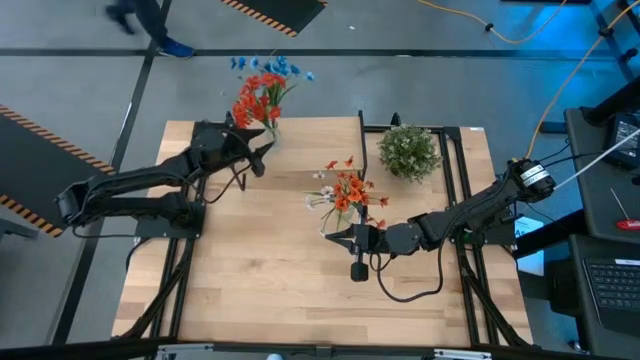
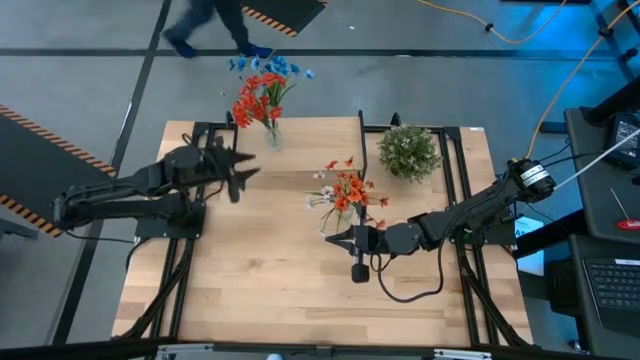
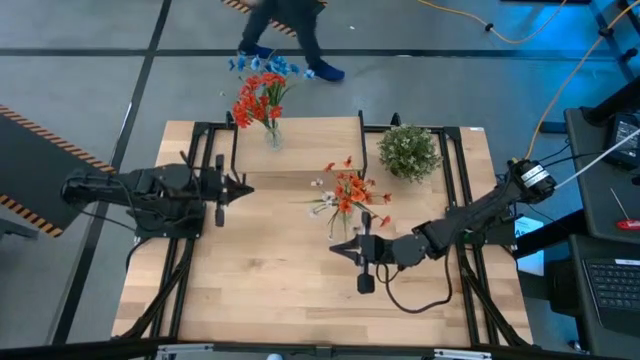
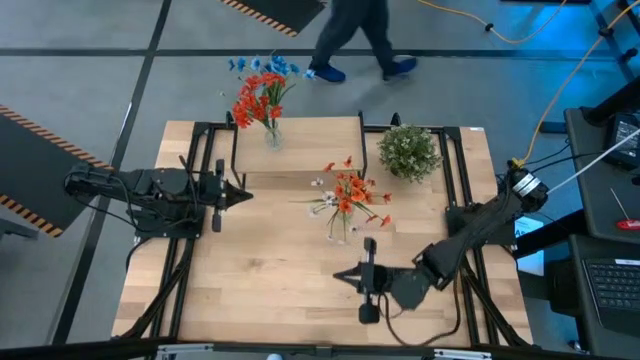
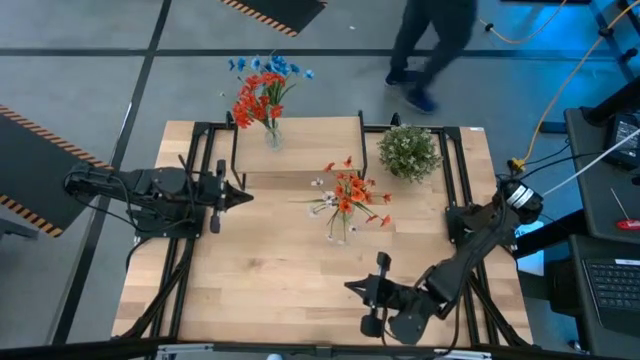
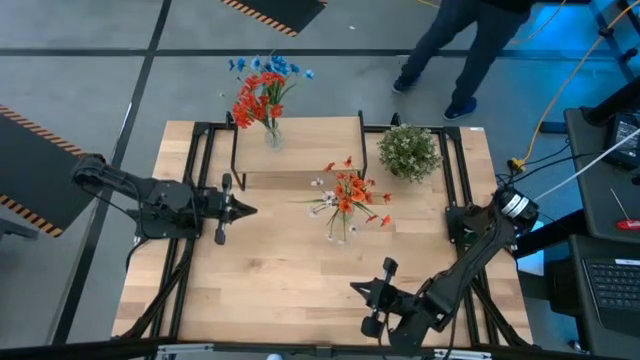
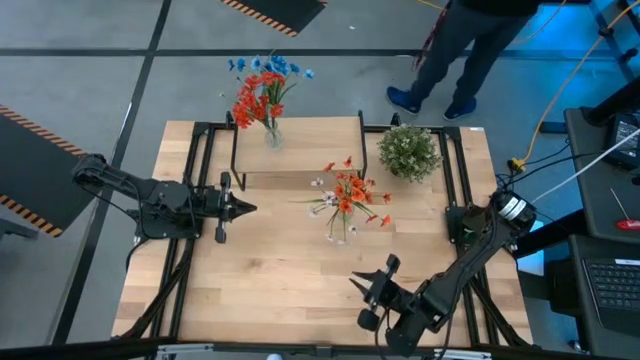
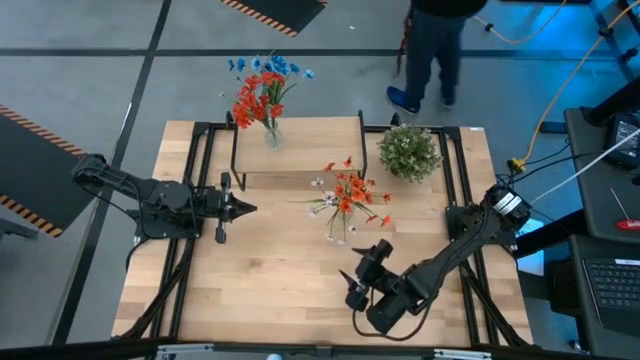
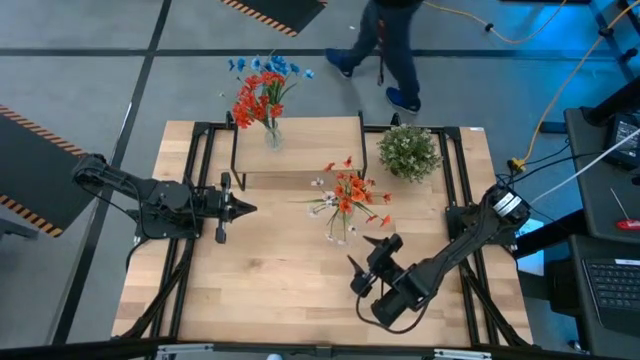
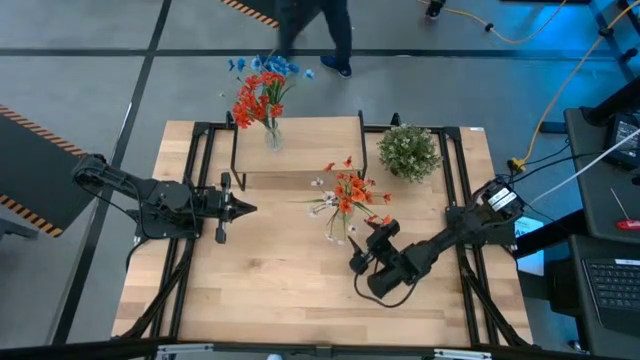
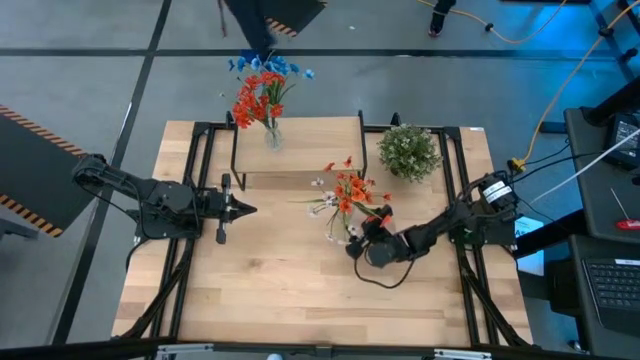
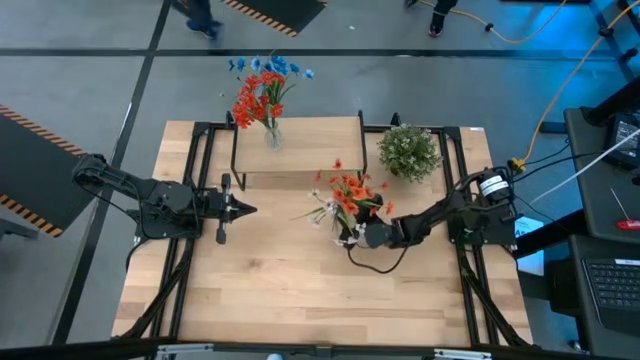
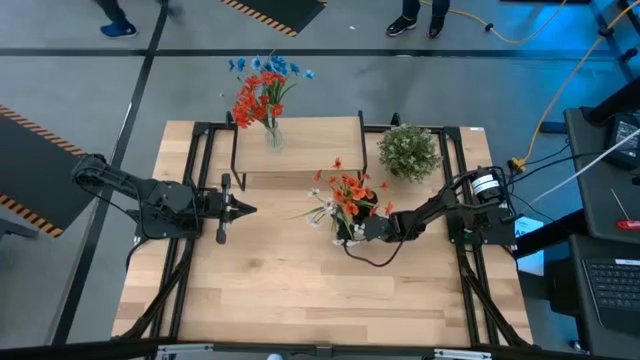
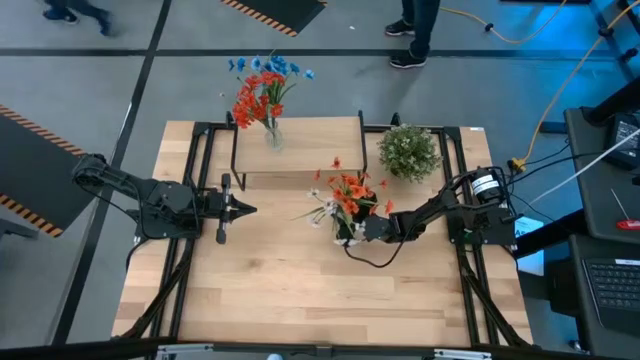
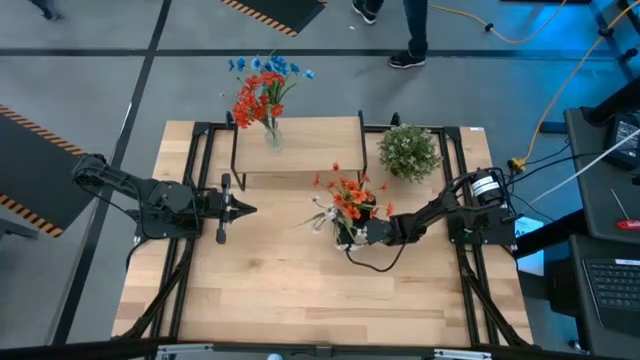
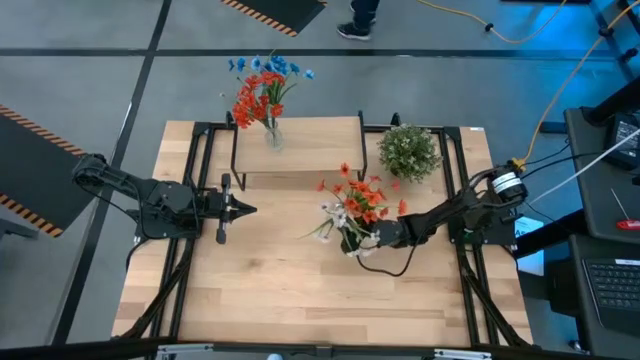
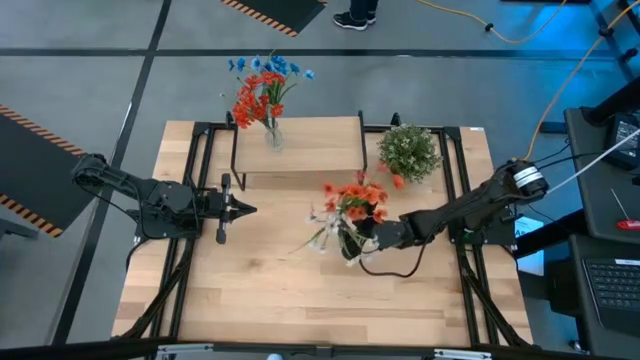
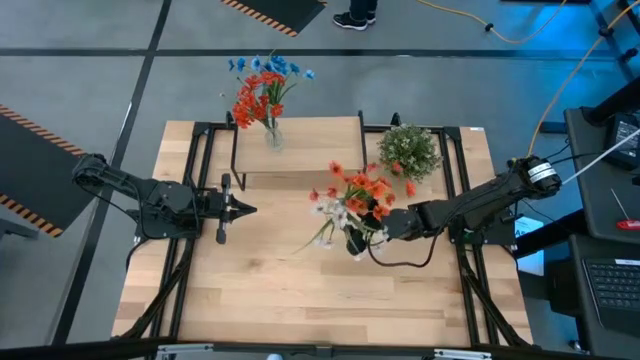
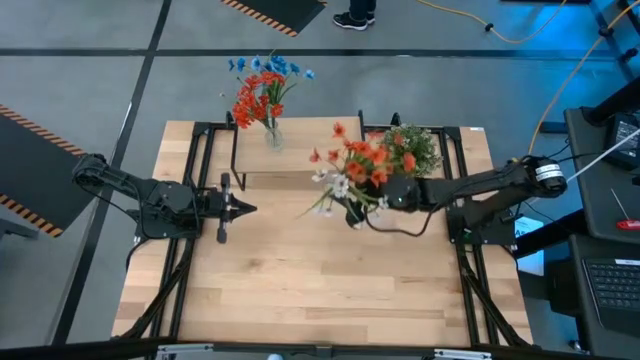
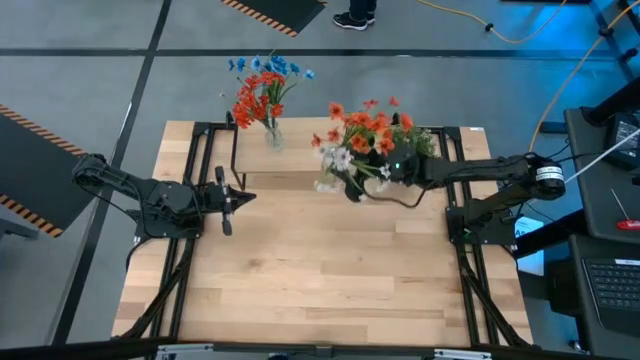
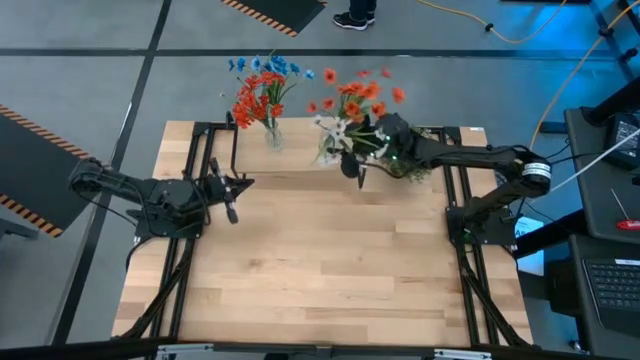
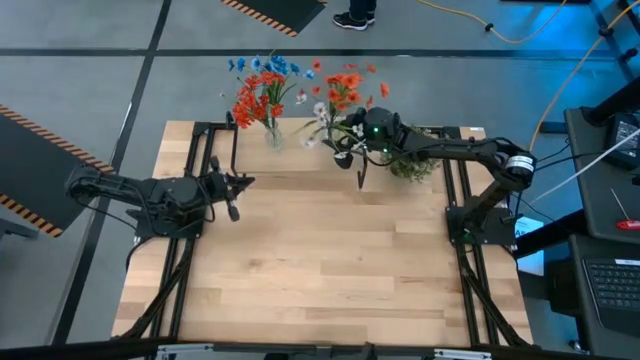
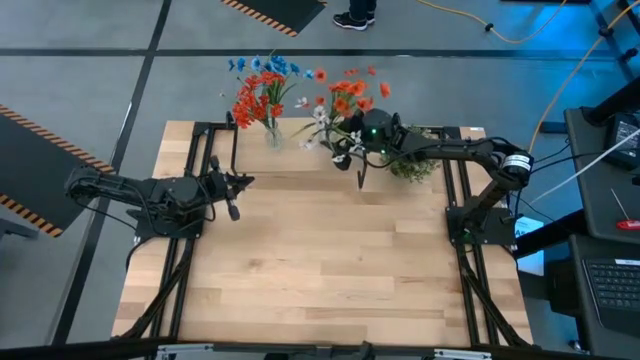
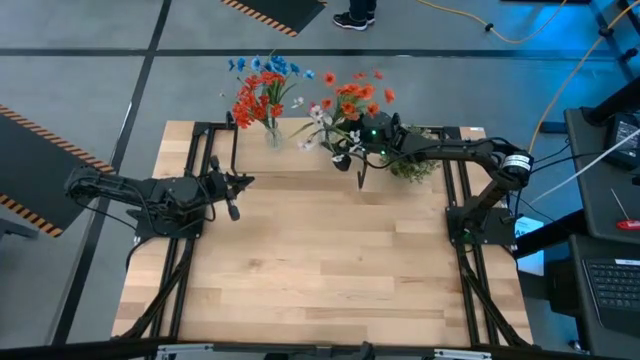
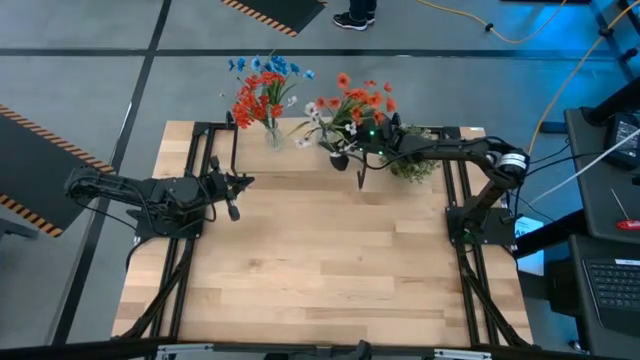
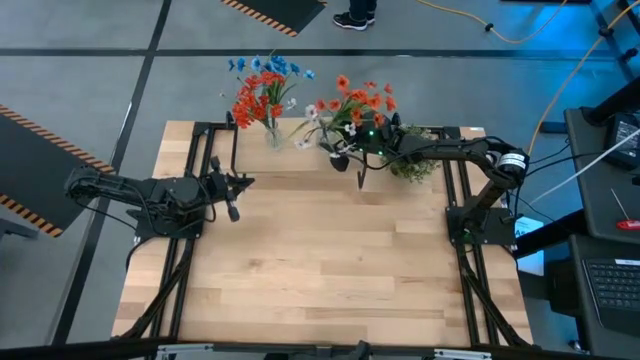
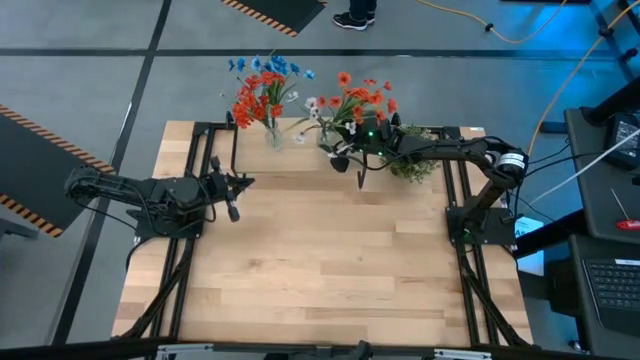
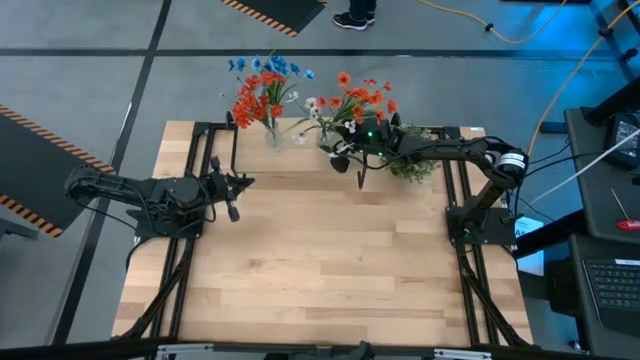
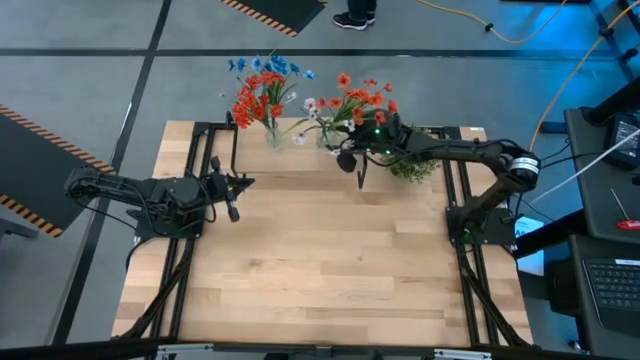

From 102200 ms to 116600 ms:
Task: Pick and place flowers into a vace then onto a shelf
Put the transparent vase on the shelf

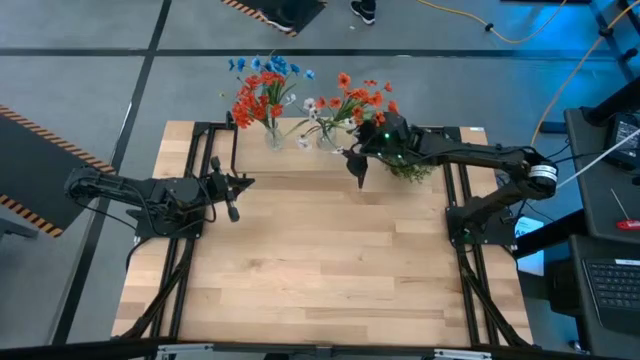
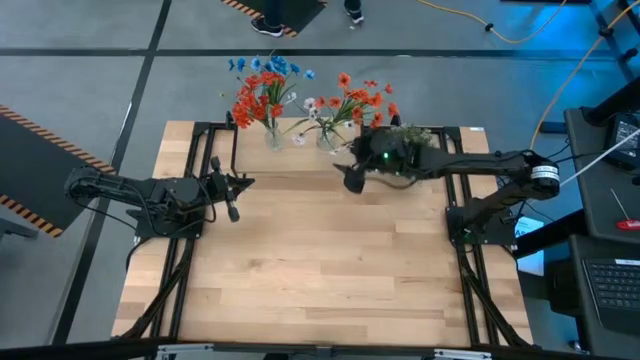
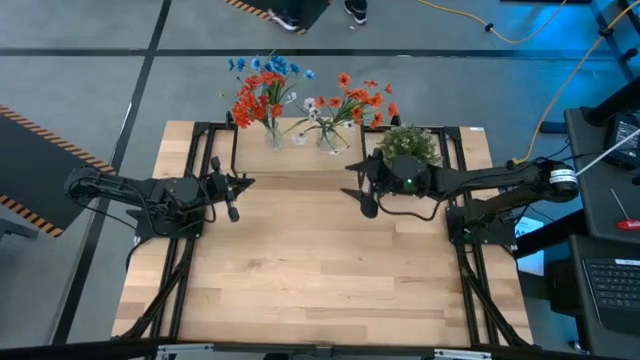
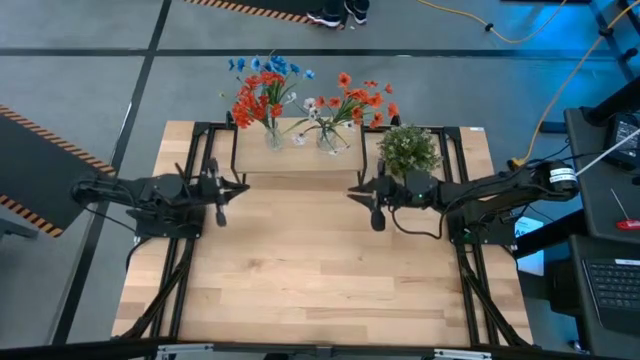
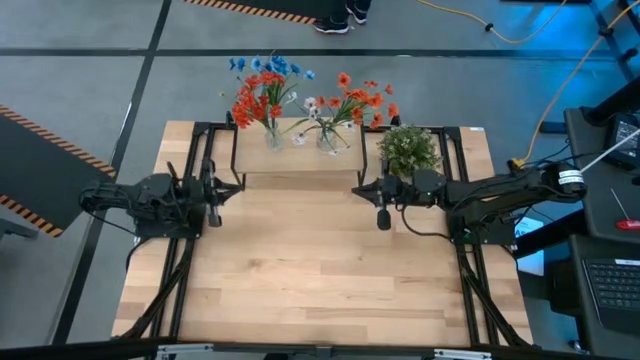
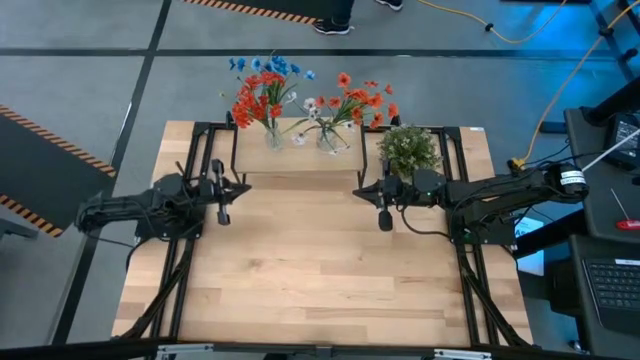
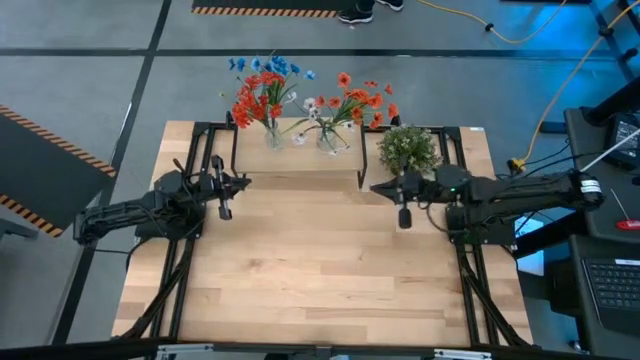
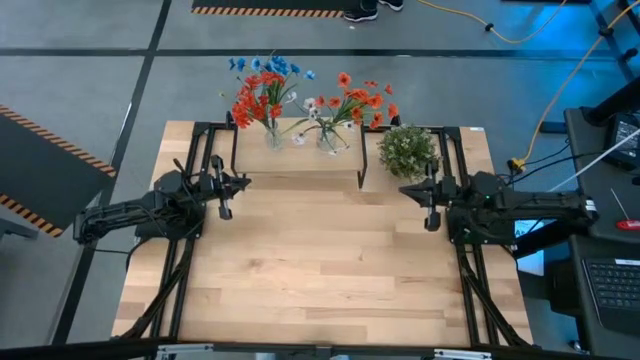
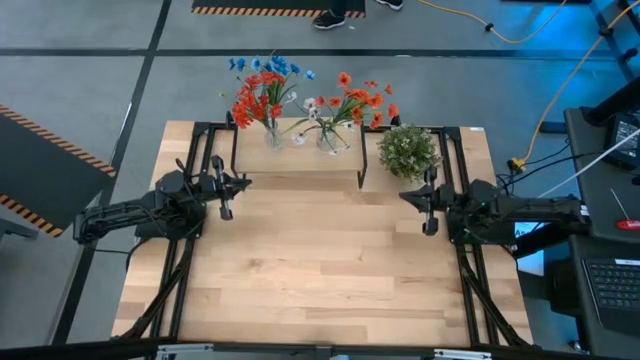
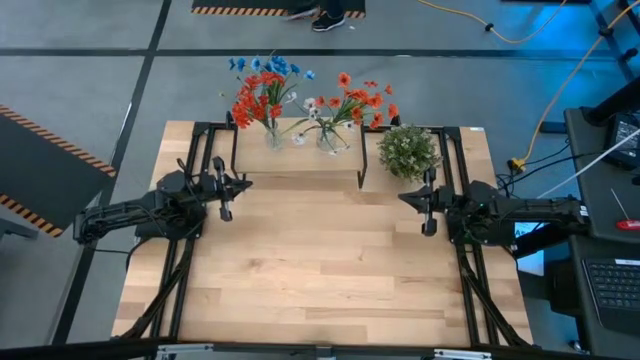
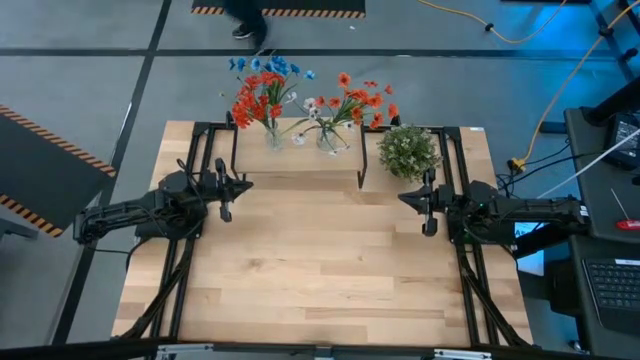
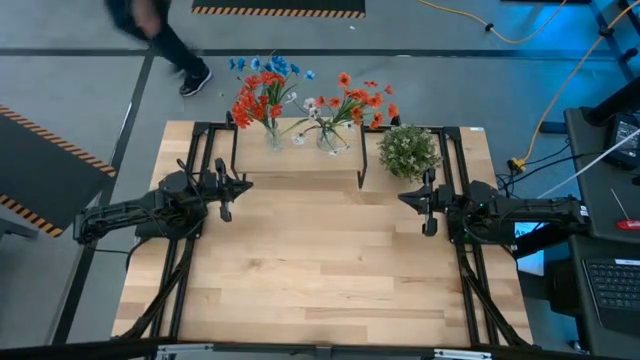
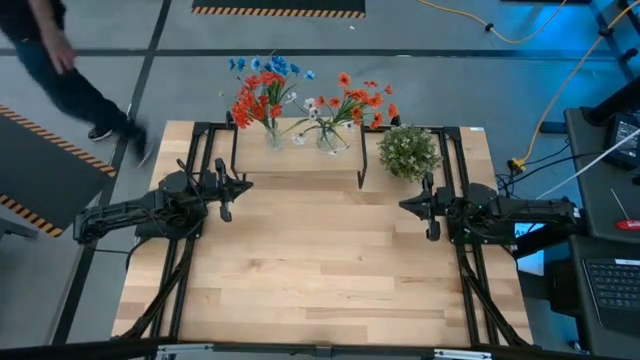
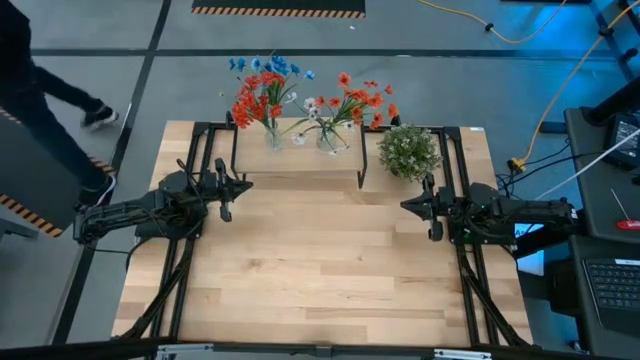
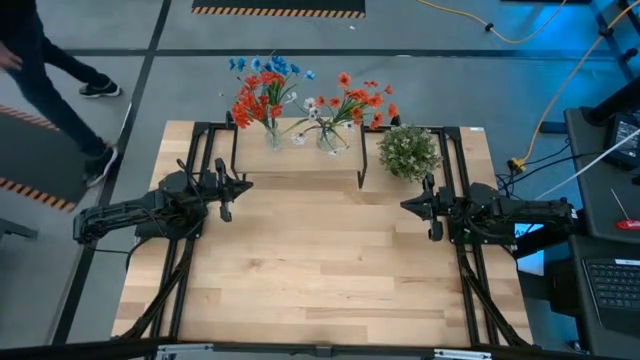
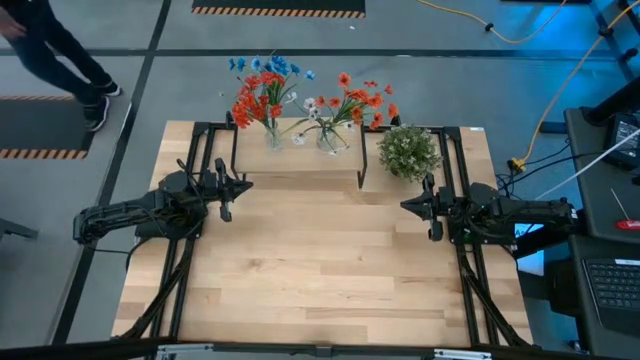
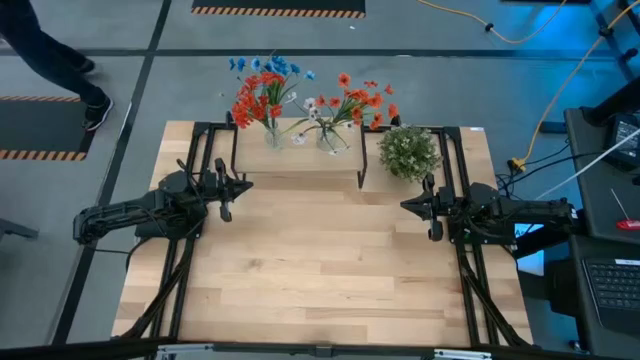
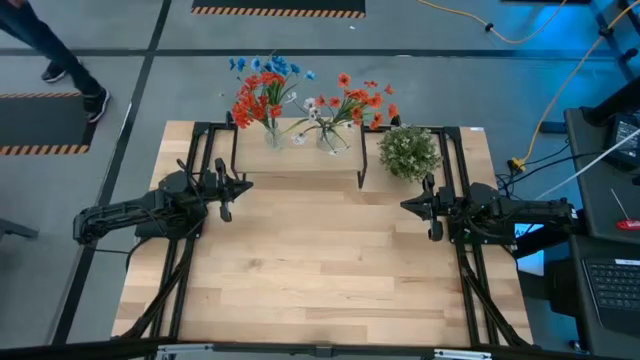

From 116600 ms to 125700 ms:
Return to Home Position
